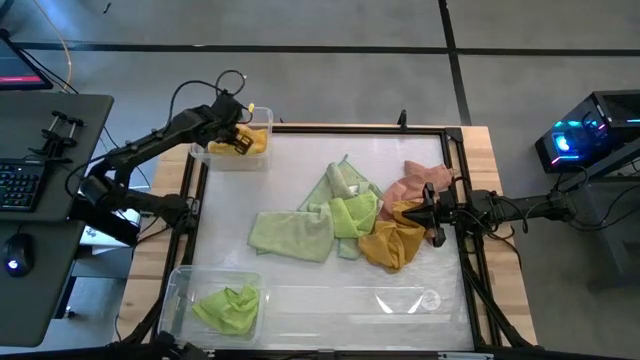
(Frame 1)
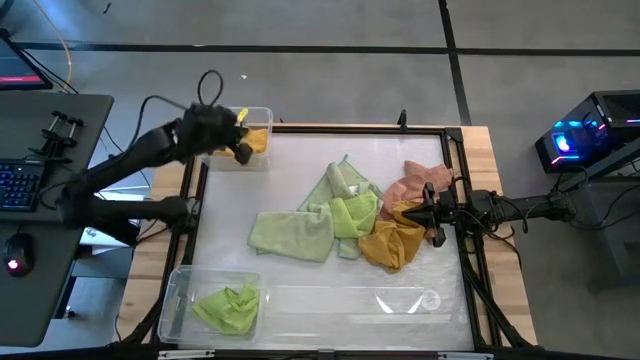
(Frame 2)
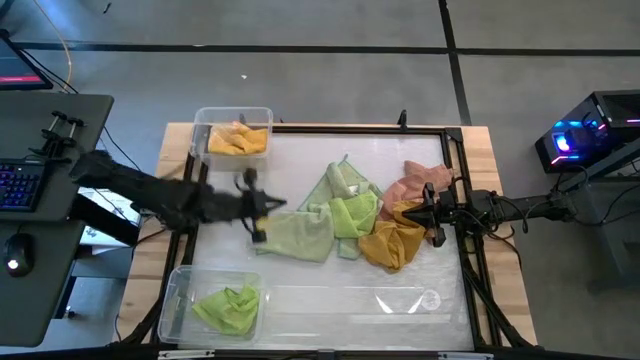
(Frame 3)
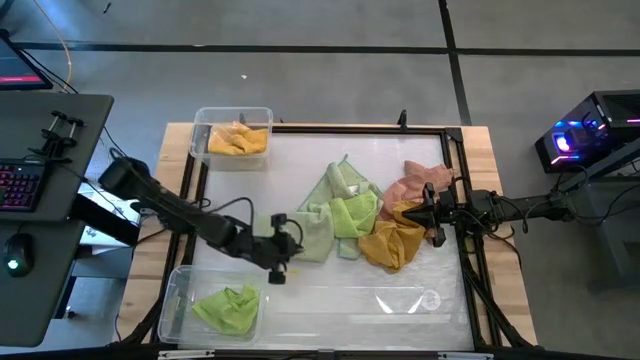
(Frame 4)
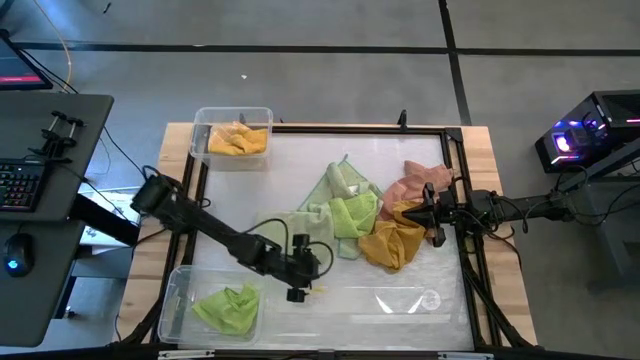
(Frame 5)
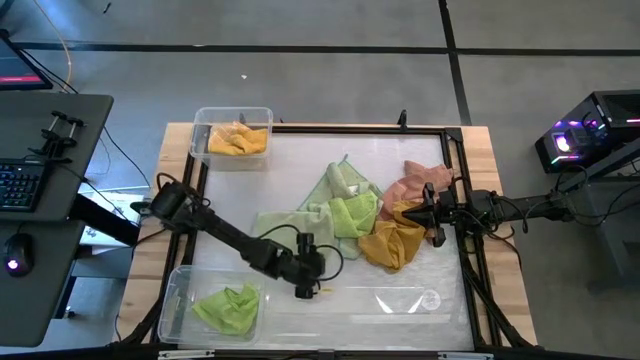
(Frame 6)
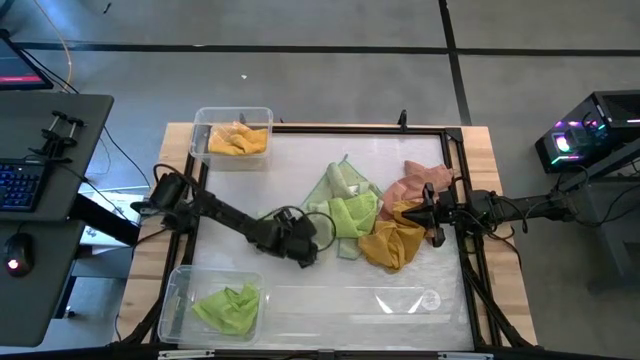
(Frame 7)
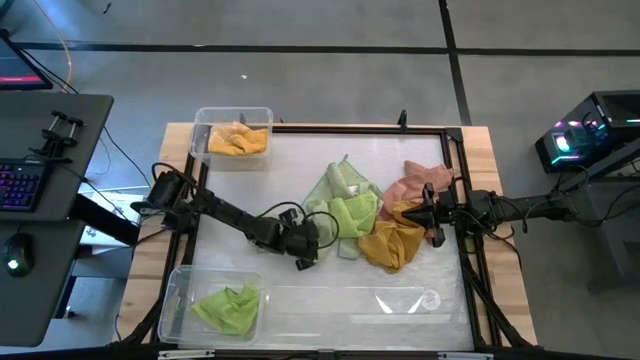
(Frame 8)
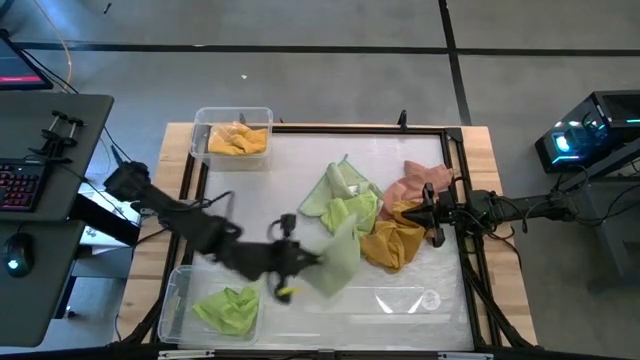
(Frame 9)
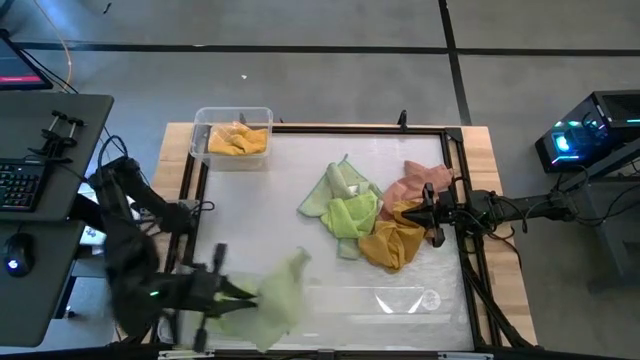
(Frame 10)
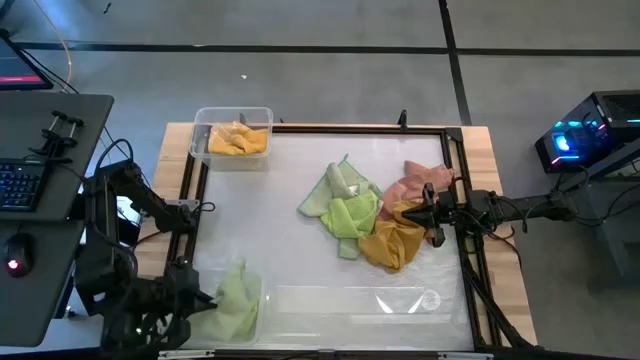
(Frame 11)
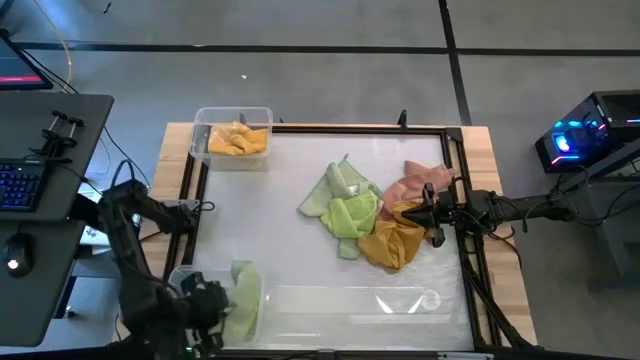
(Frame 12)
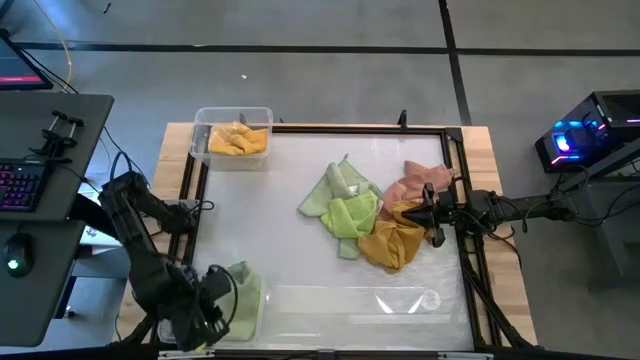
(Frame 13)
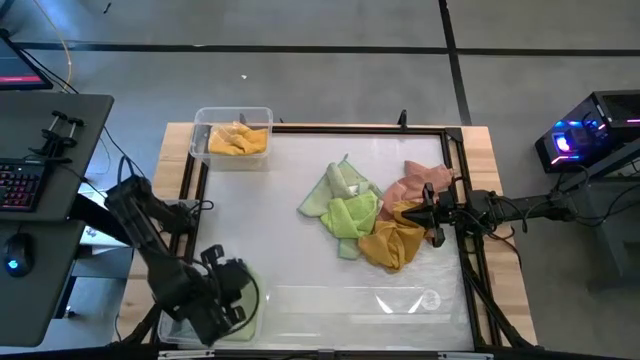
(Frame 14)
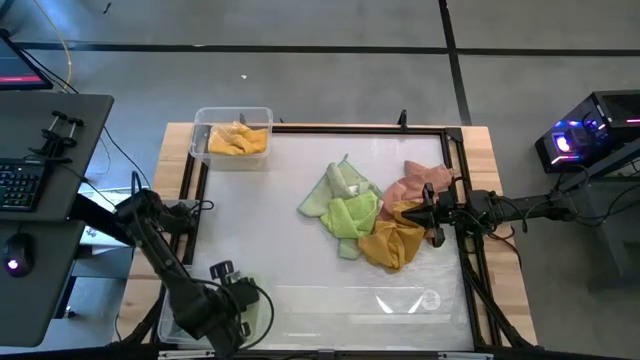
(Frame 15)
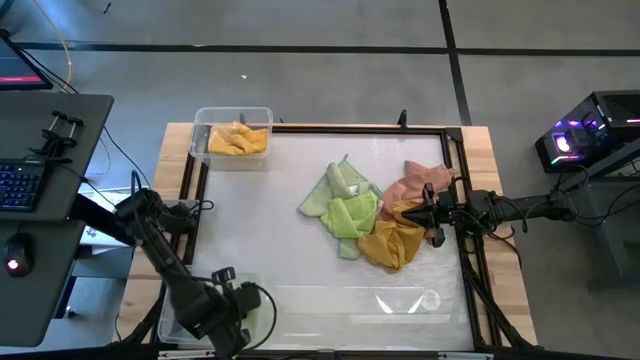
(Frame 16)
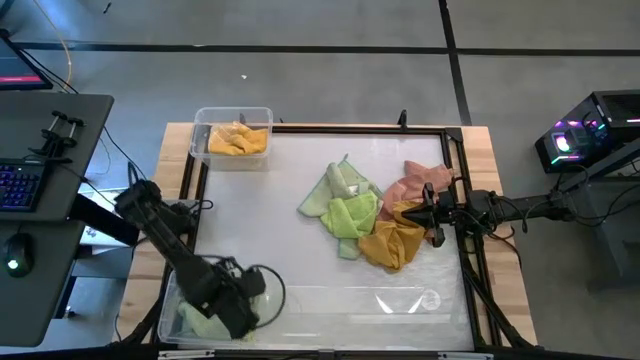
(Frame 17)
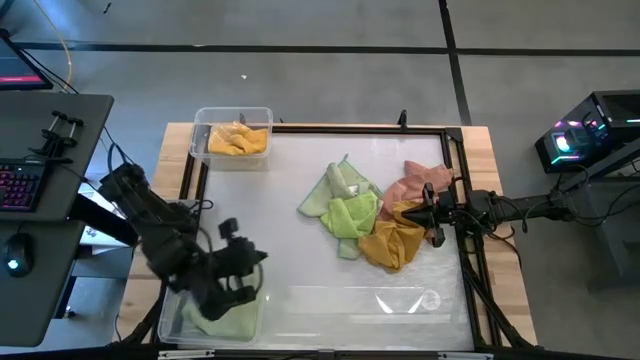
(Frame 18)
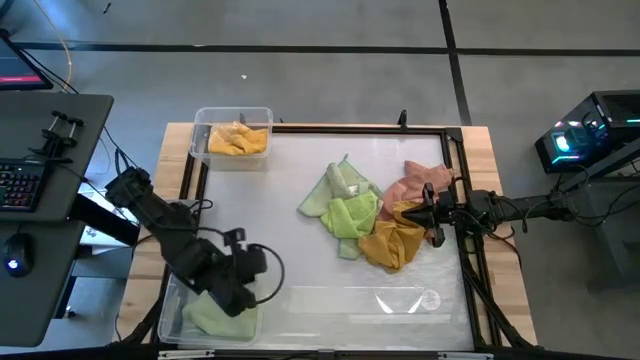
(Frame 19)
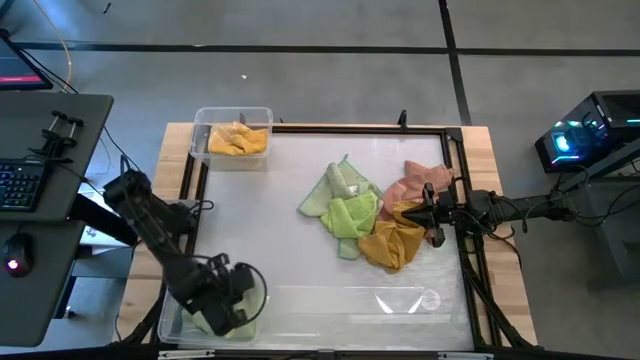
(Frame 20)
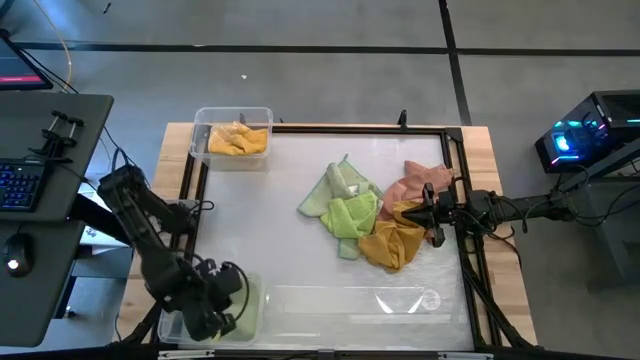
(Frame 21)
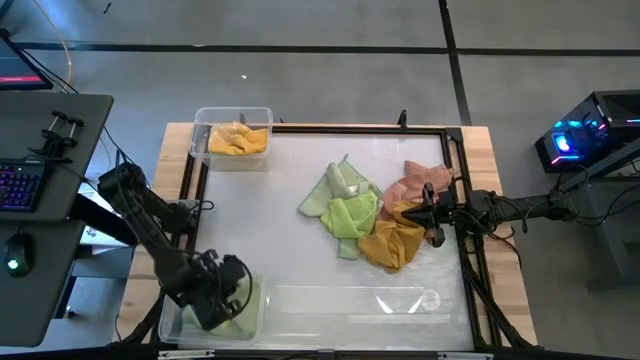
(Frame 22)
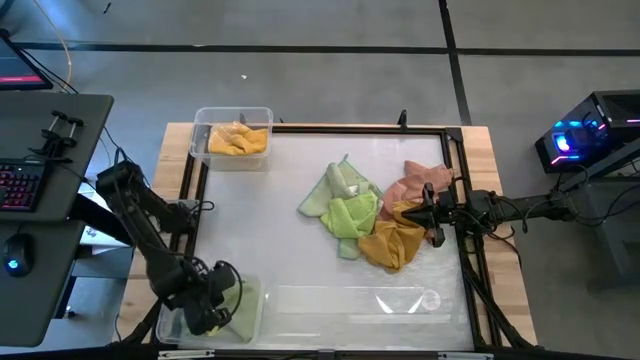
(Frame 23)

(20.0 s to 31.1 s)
Task: Sort towels by color in basket
Put the bottom green towel into the bottom transparent bin

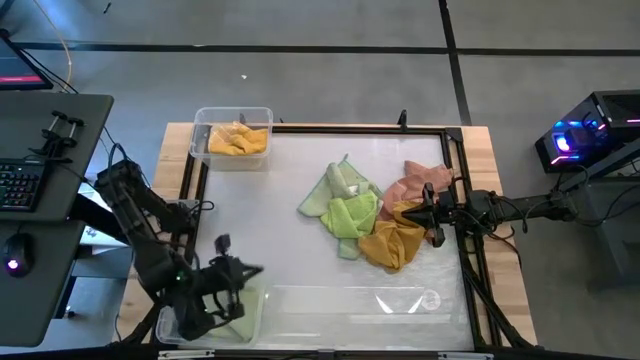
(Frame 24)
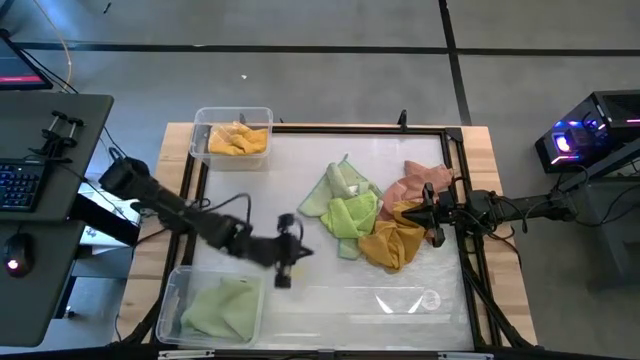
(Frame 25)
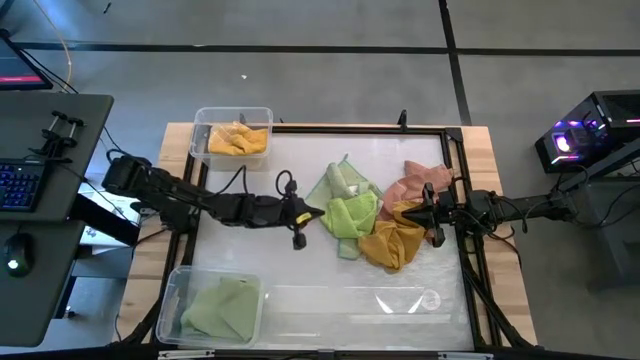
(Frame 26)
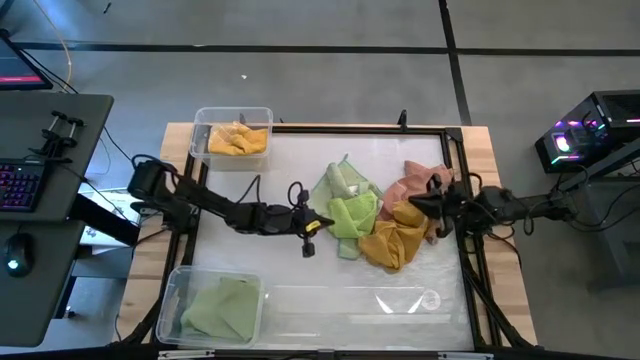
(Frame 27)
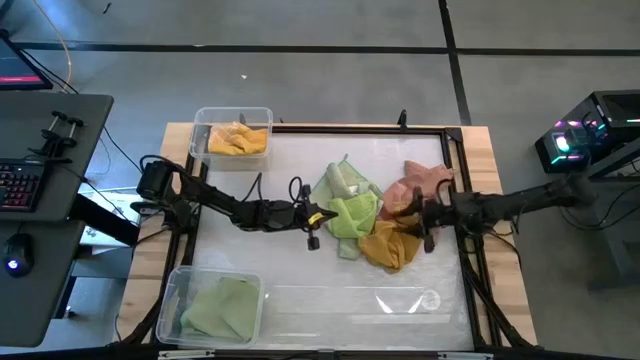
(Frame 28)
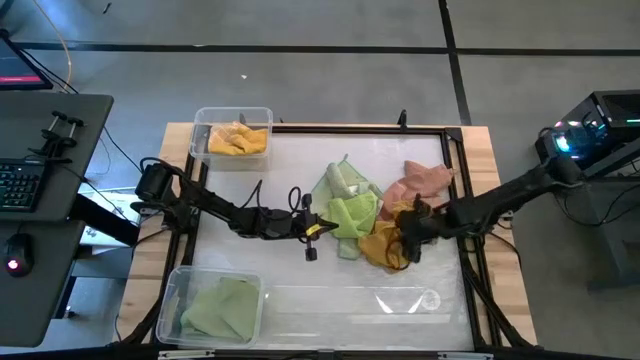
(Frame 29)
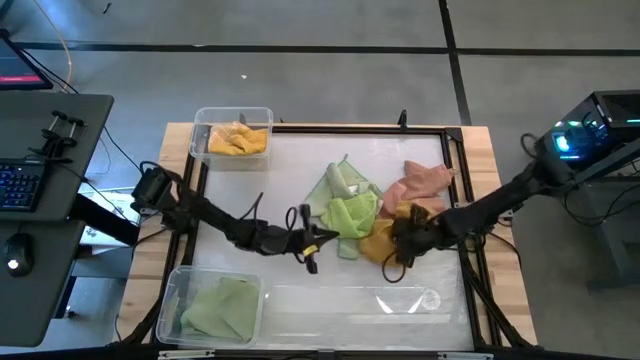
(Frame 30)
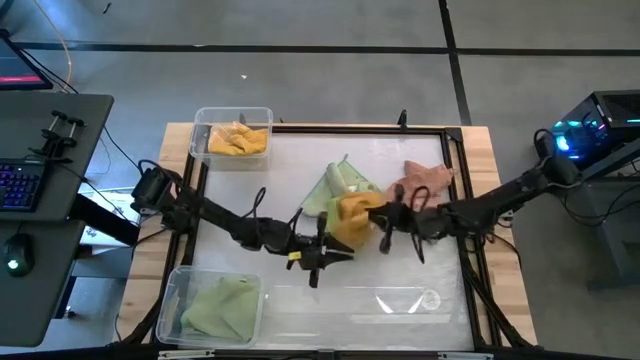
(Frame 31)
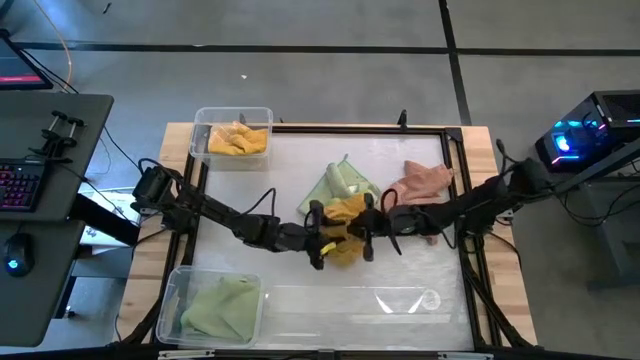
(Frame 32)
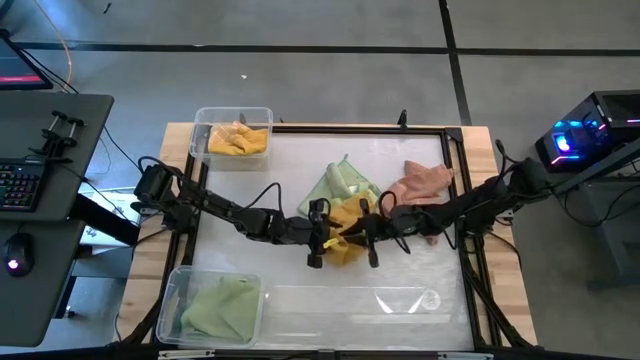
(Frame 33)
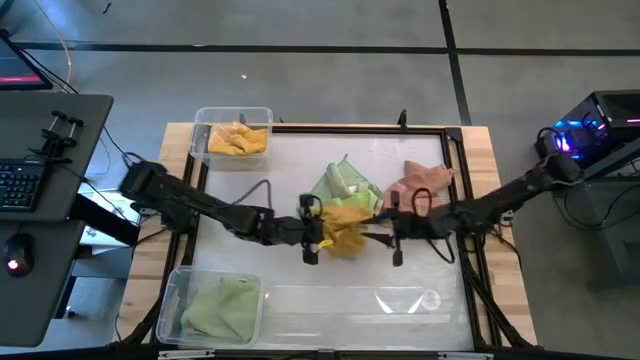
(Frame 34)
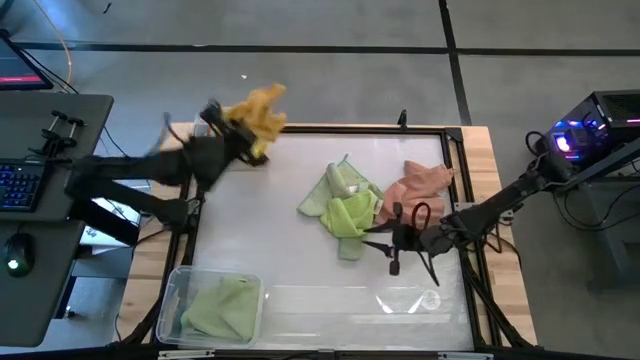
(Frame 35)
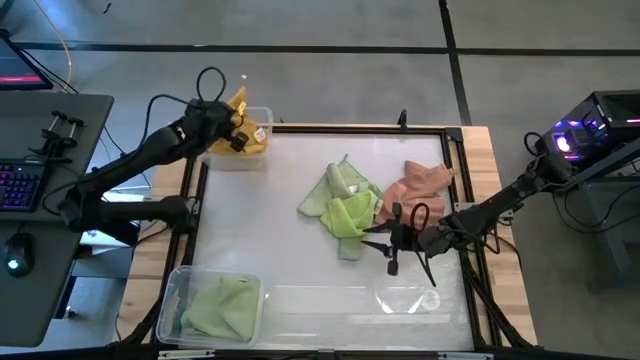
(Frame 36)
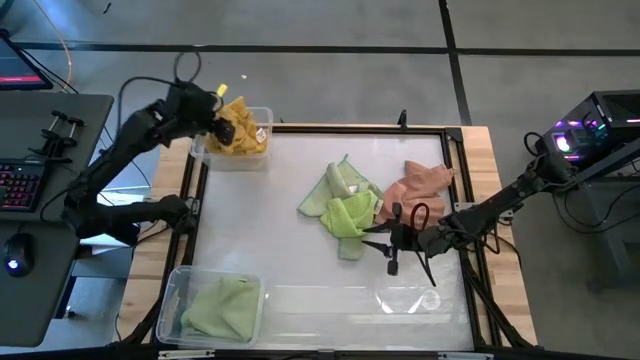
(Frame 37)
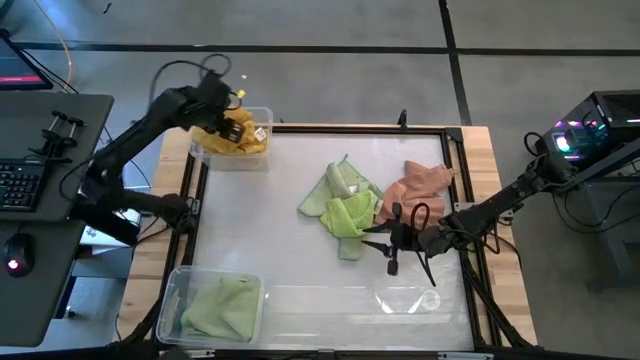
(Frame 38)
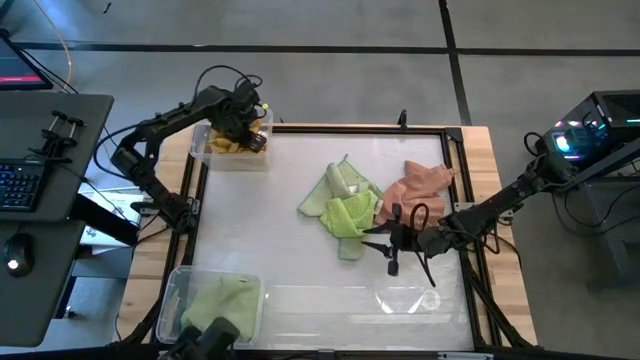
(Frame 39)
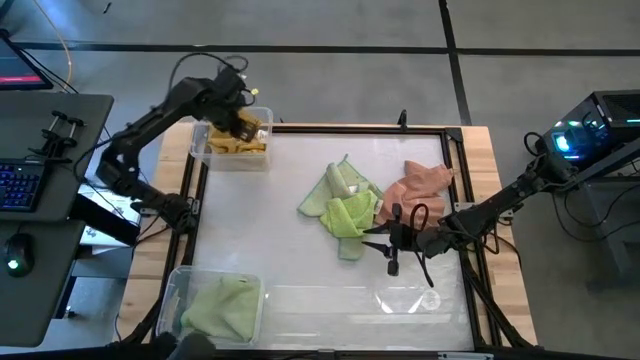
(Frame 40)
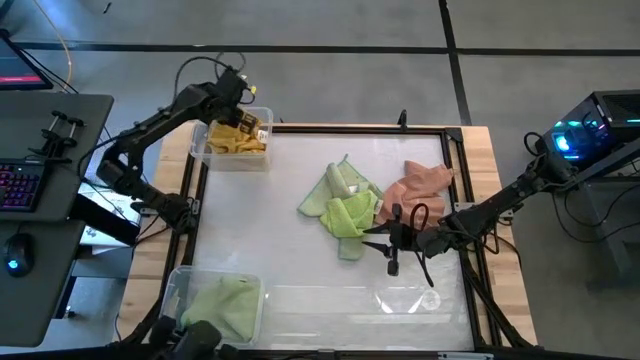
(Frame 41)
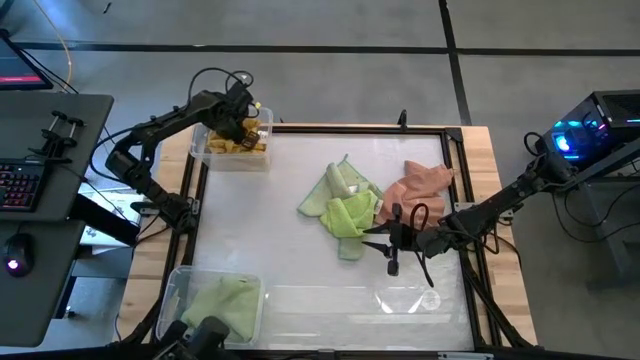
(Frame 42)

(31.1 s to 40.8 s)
Put the light orange towel into the top transparent bin
